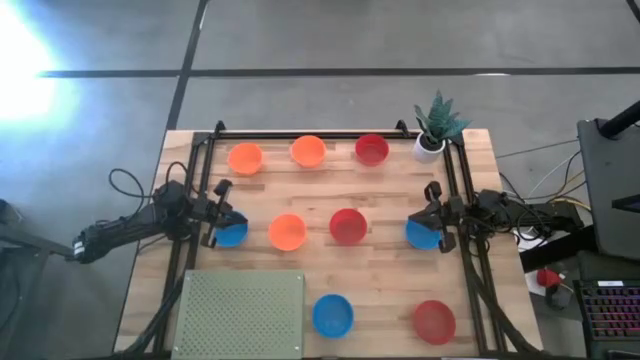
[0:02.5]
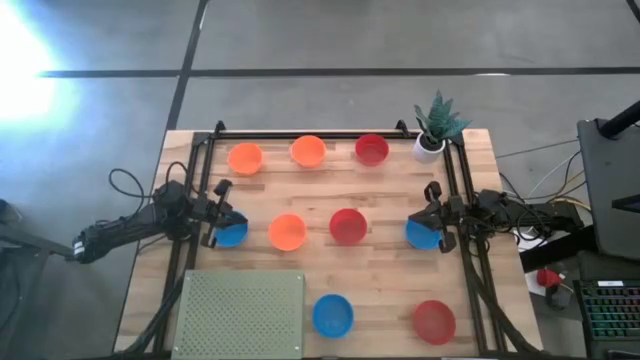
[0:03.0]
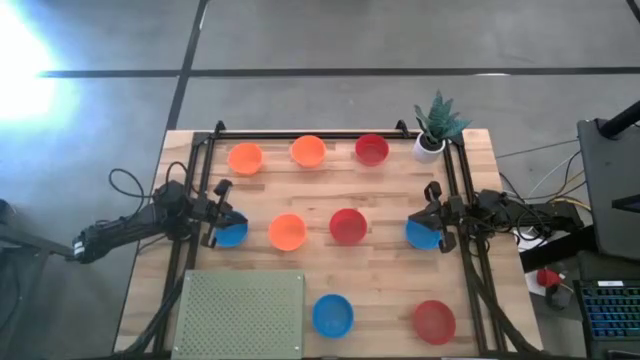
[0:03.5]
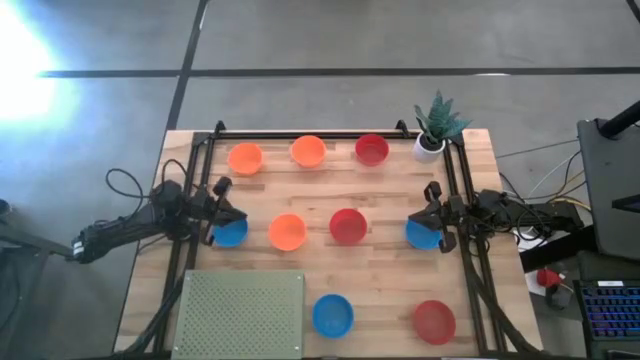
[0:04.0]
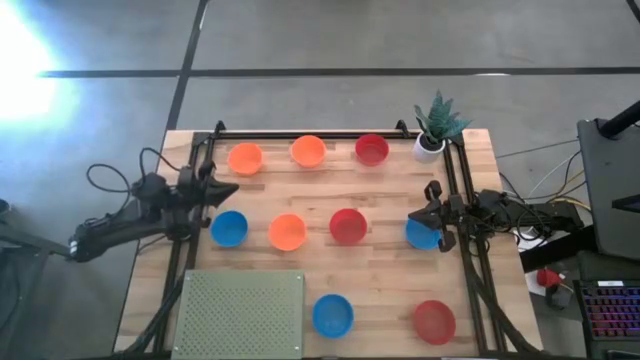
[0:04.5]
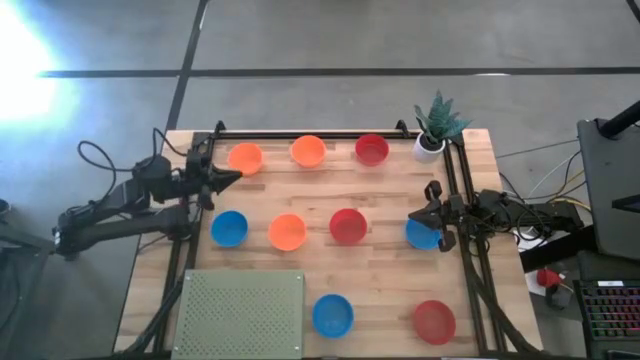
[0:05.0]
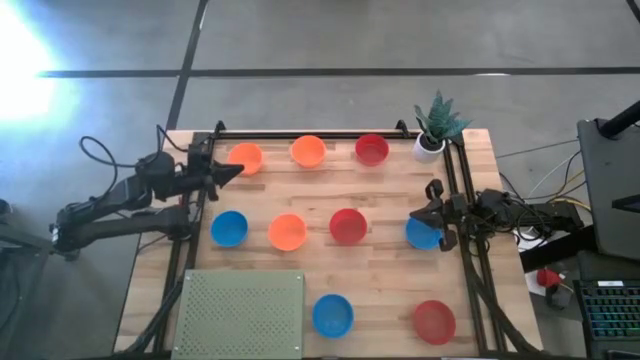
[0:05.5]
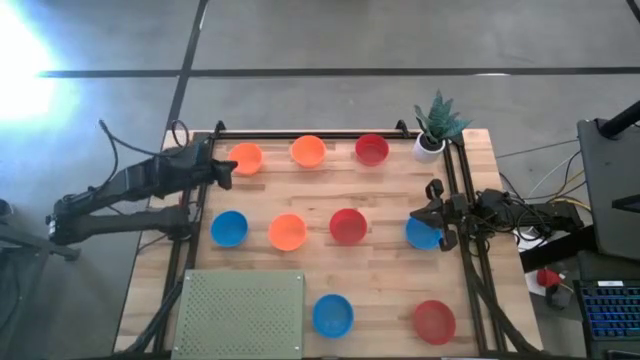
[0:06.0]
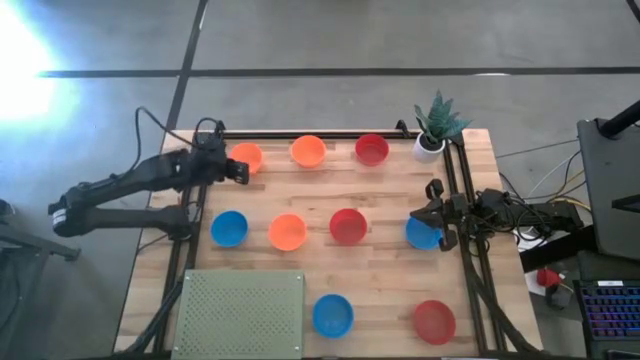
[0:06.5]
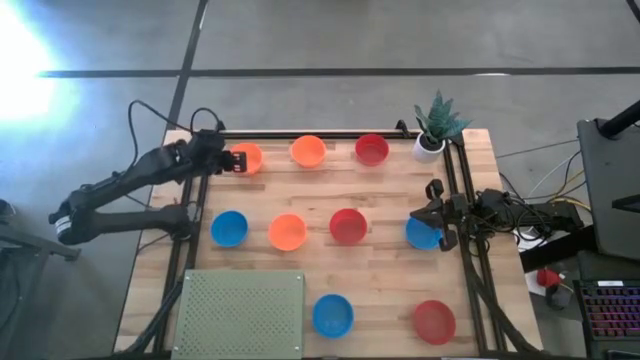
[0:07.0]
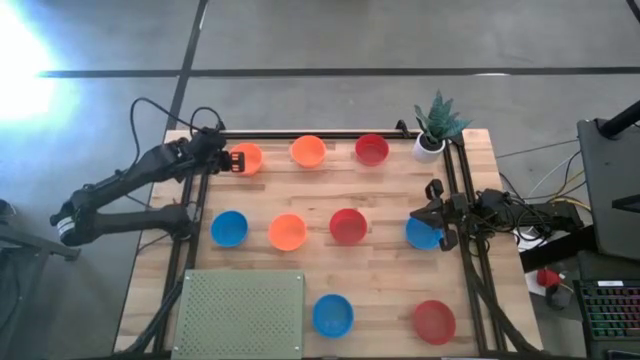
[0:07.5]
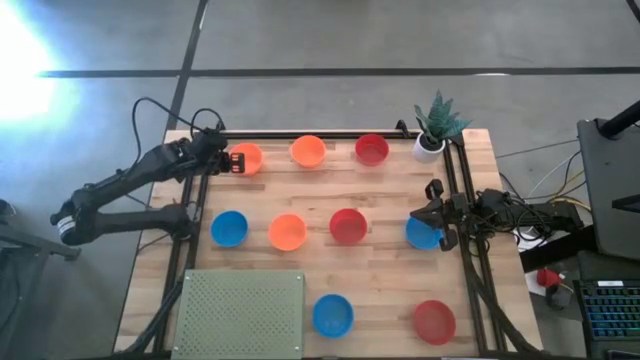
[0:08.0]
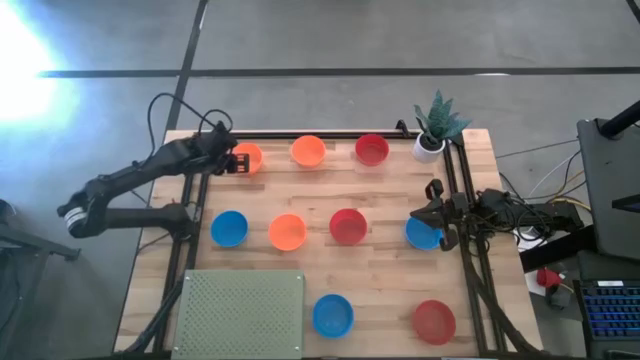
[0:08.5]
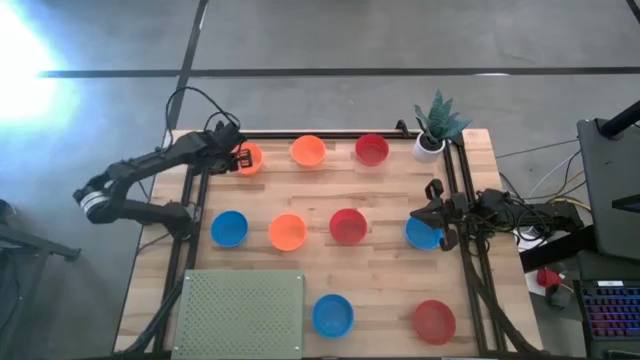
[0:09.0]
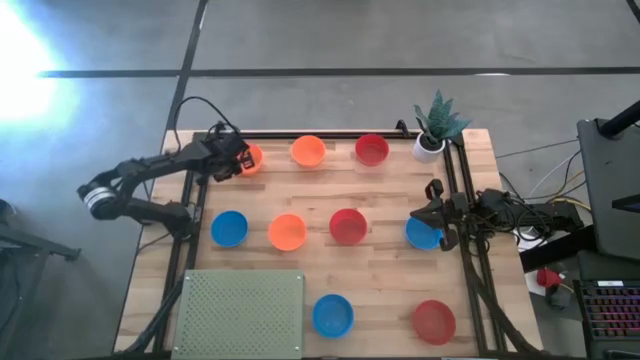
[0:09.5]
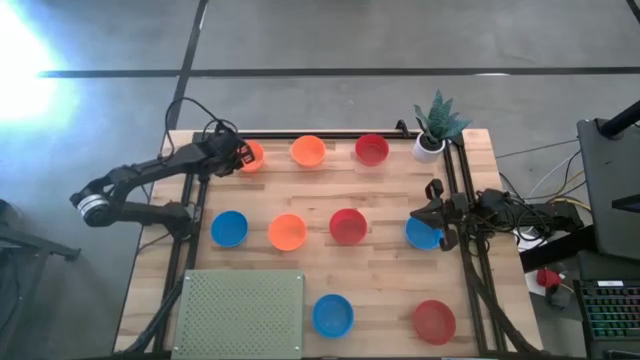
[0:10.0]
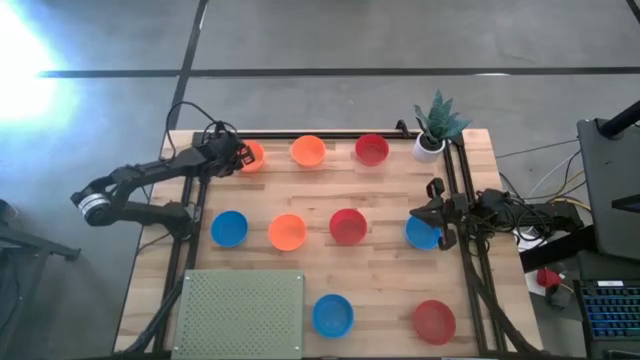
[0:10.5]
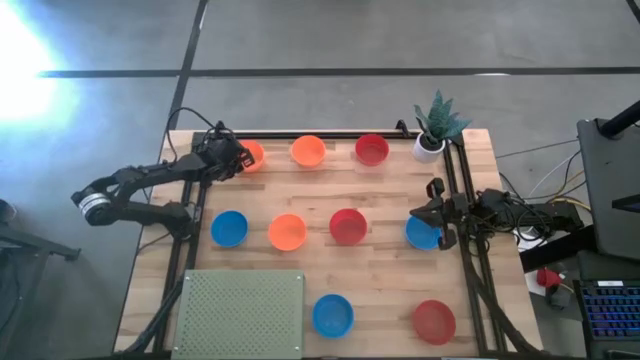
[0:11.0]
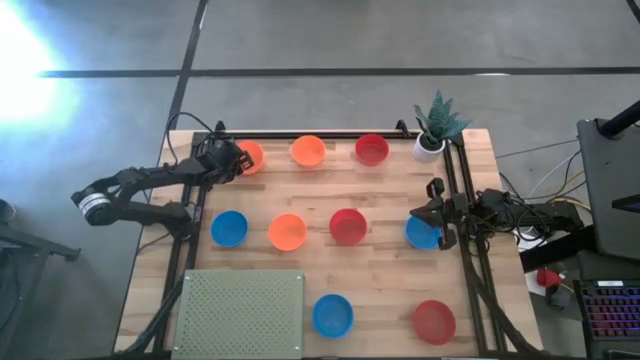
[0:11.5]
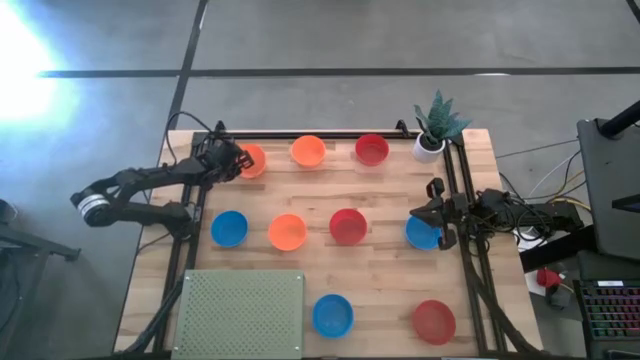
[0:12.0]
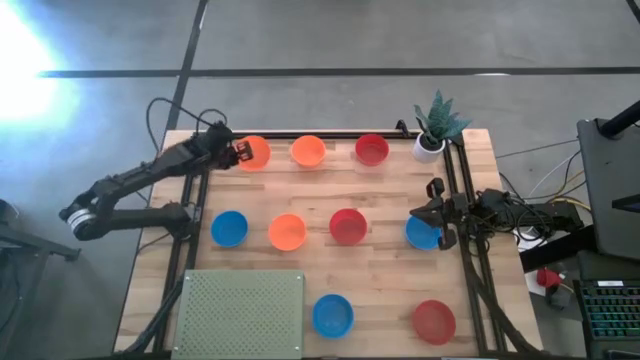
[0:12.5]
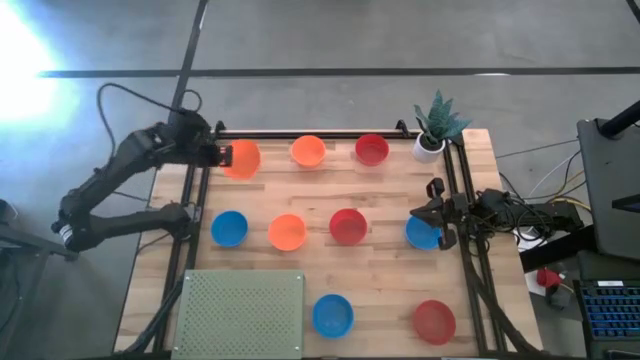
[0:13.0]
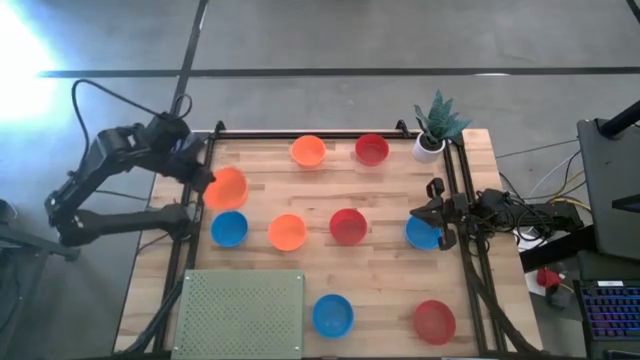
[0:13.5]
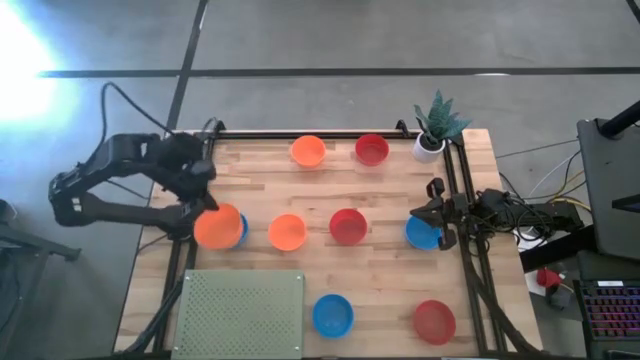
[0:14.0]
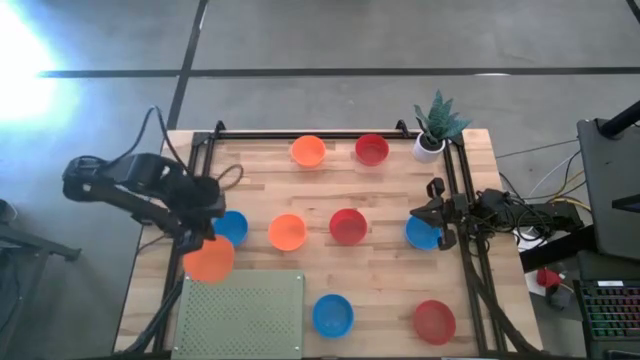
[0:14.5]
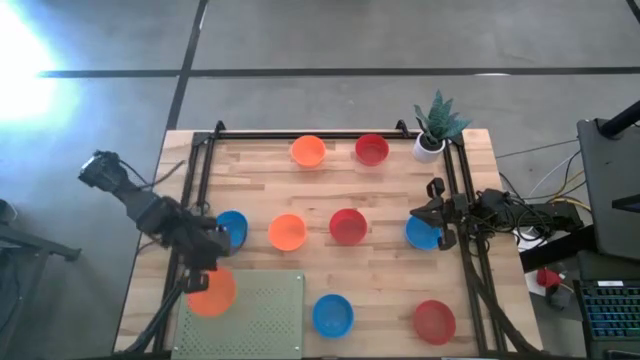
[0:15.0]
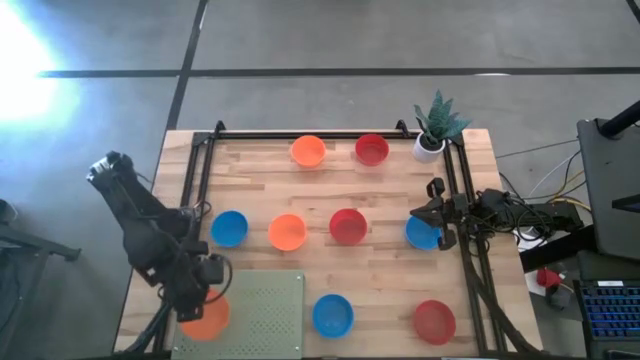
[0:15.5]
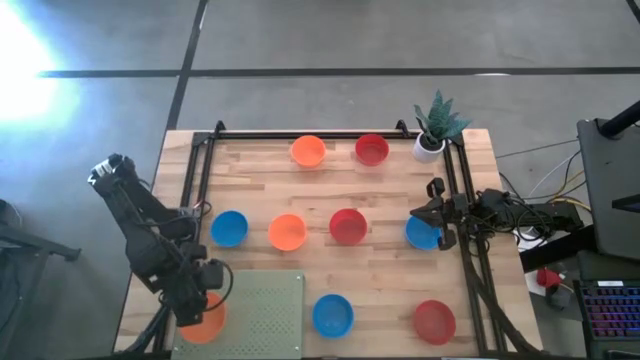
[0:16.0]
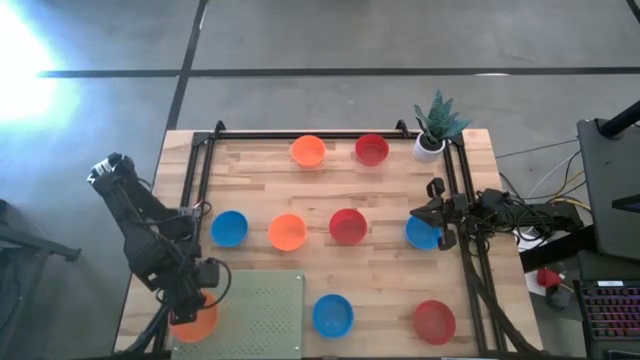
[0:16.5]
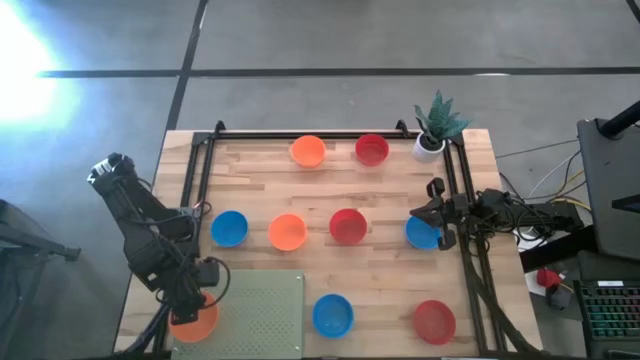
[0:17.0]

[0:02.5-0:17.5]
Task: Pick & Place Mini bowls
Put the top left orange bowl on the shelf

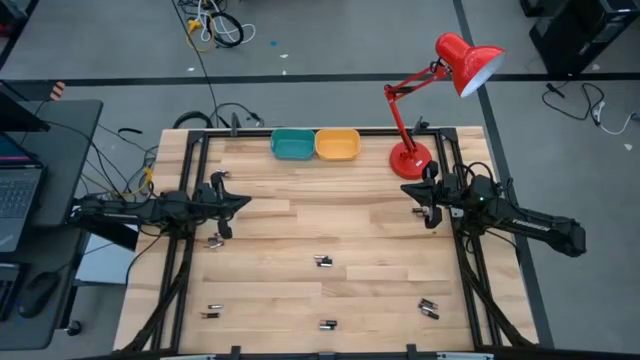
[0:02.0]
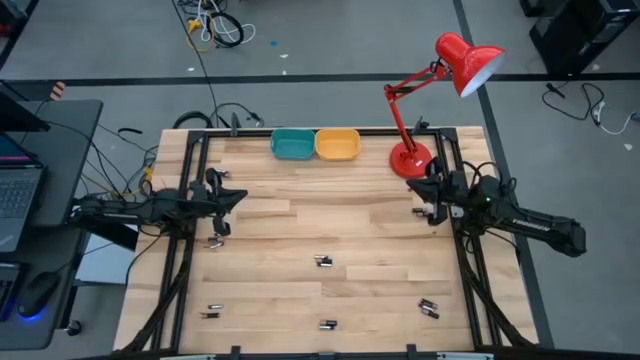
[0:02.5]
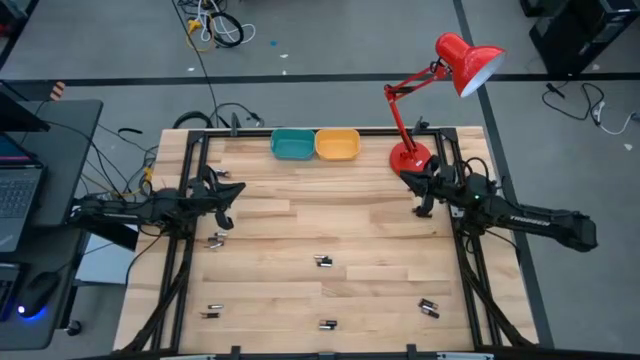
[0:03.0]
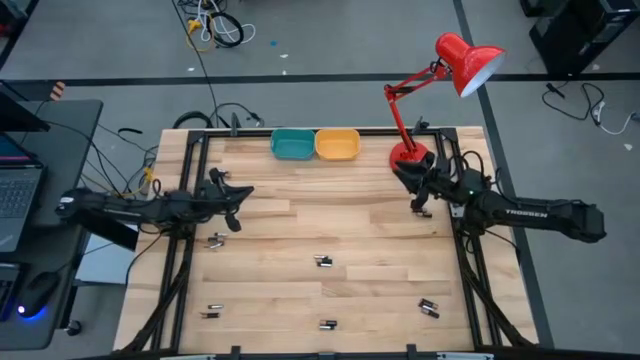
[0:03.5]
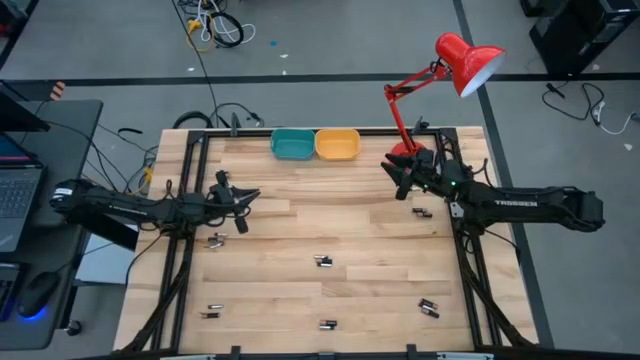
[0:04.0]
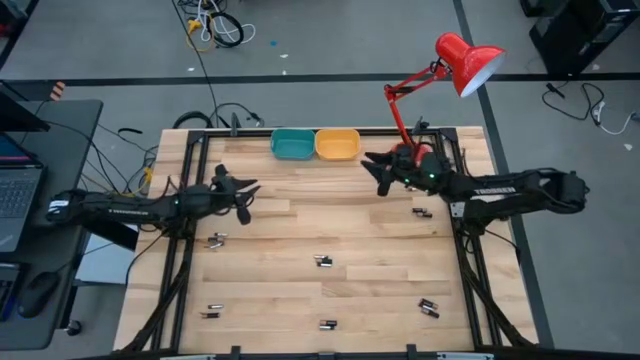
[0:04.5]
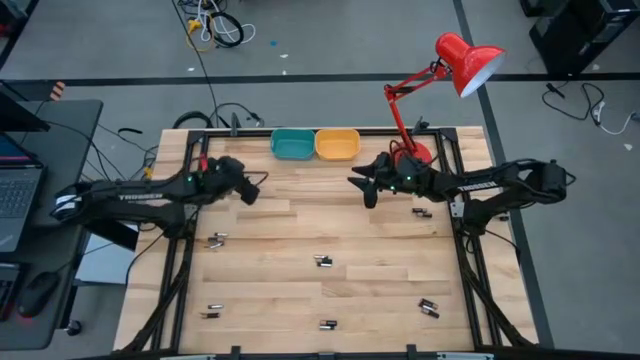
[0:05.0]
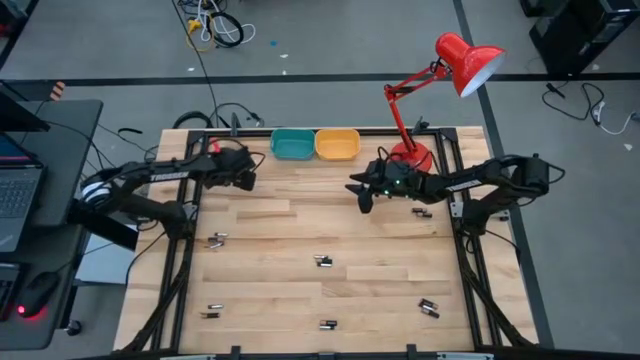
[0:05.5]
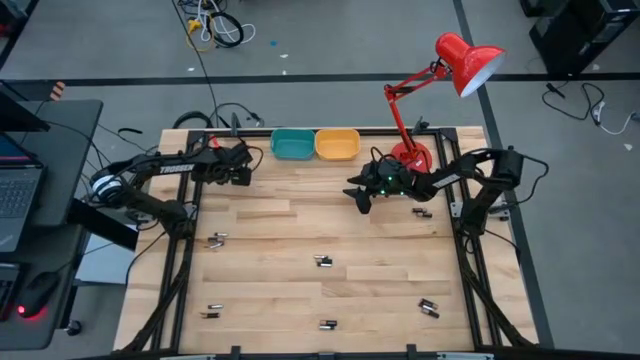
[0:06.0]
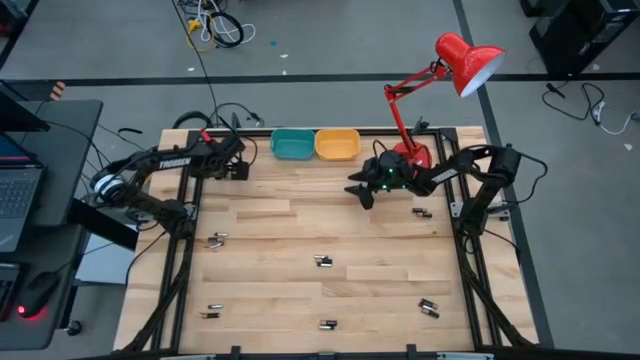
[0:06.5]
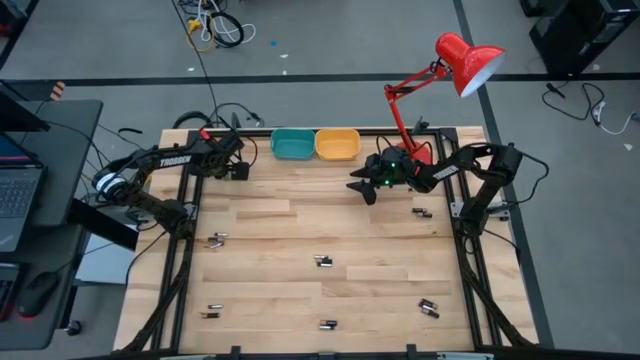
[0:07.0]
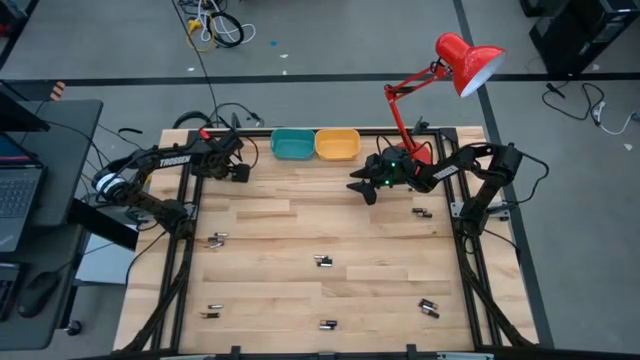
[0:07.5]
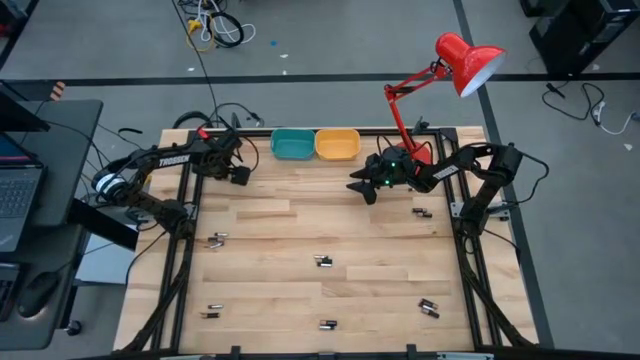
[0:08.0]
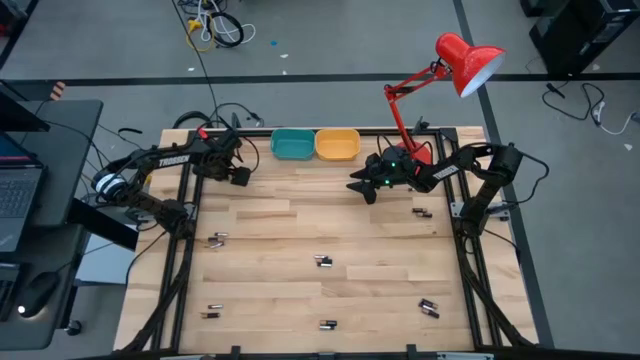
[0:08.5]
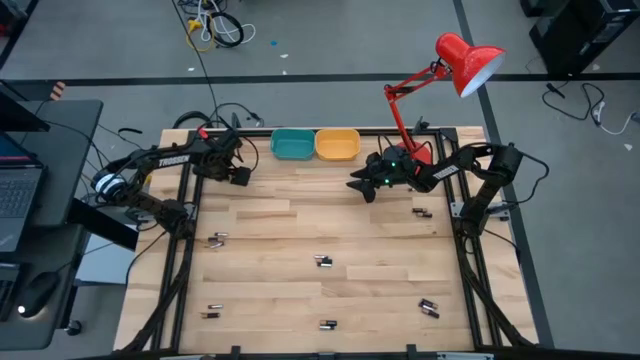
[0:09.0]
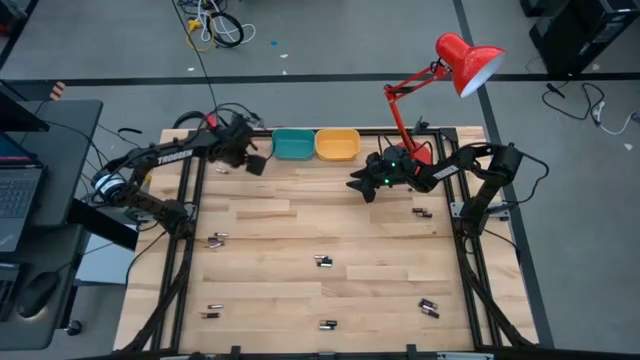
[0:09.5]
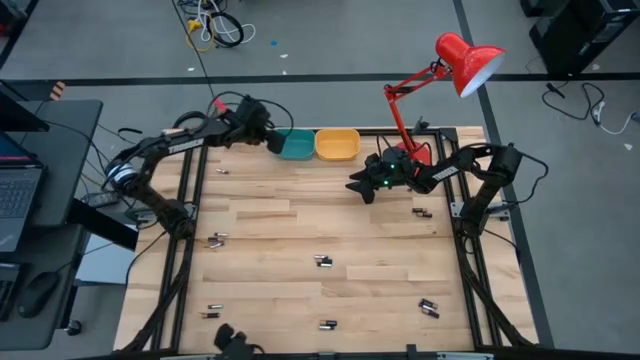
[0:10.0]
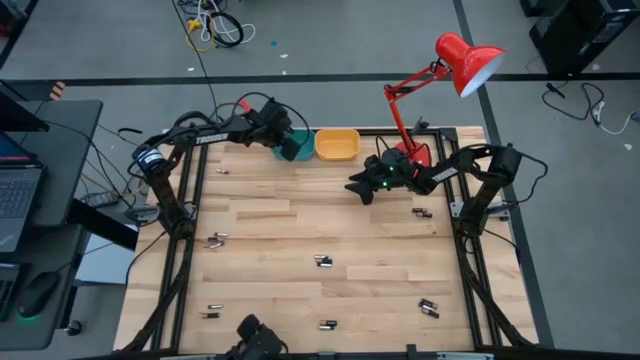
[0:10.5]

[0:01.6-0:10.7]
Task: Sort batteries
Put the black battery into the blue bin
